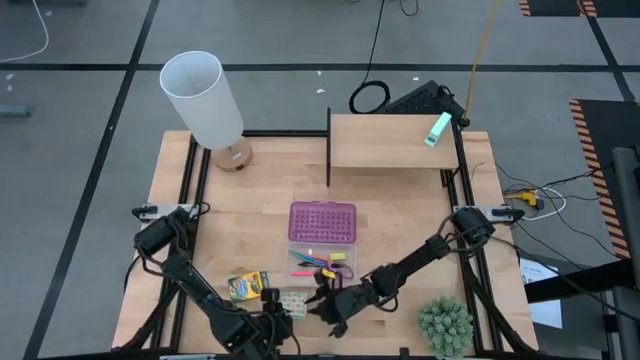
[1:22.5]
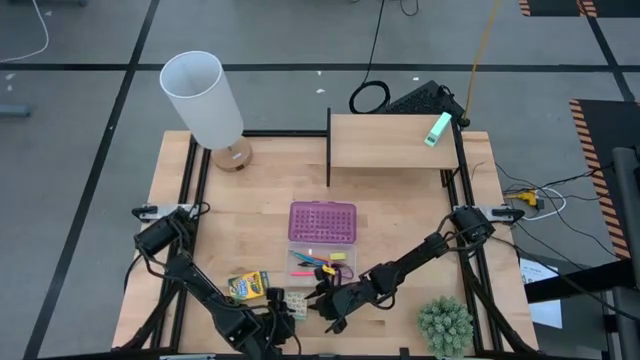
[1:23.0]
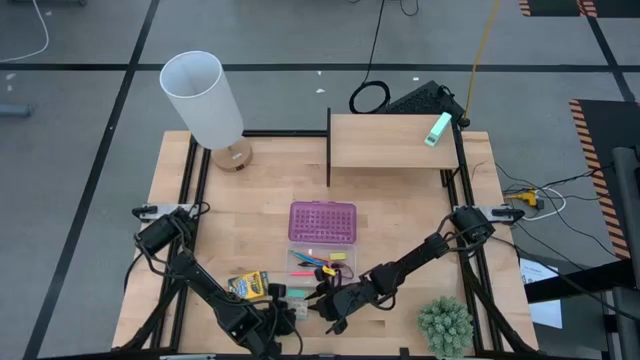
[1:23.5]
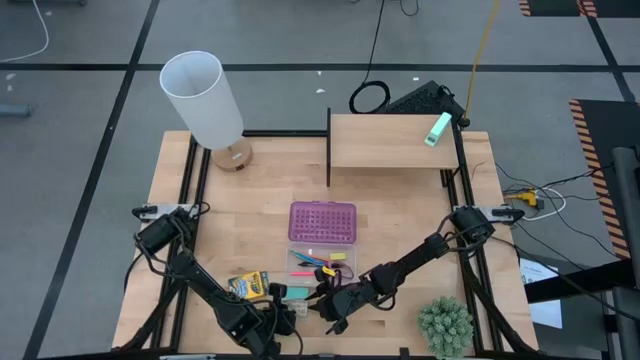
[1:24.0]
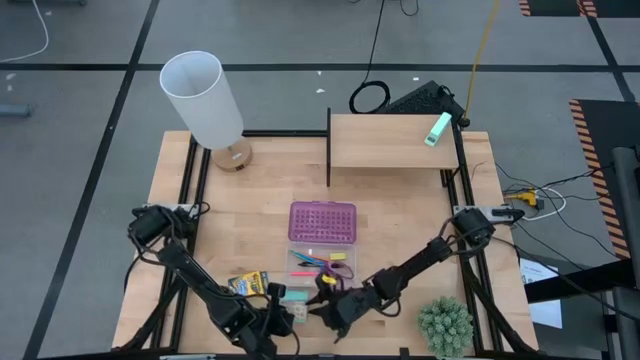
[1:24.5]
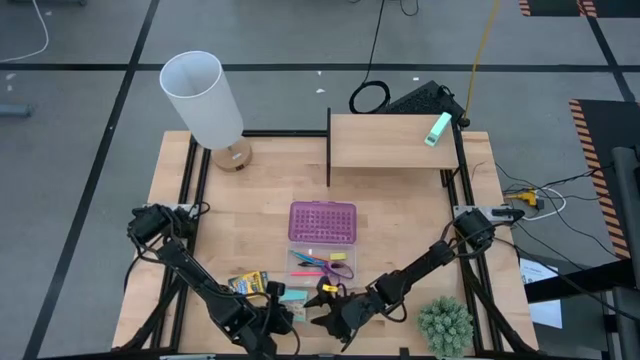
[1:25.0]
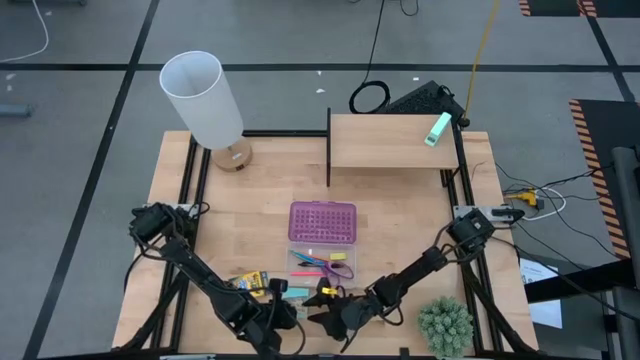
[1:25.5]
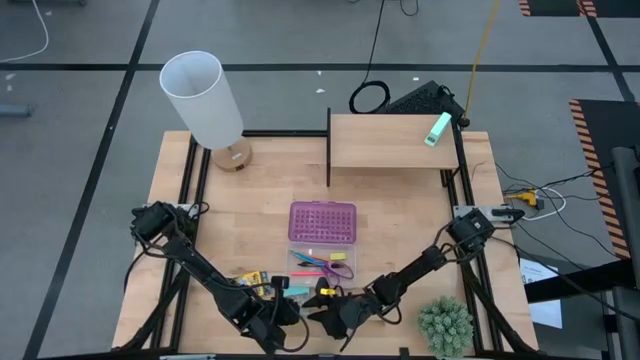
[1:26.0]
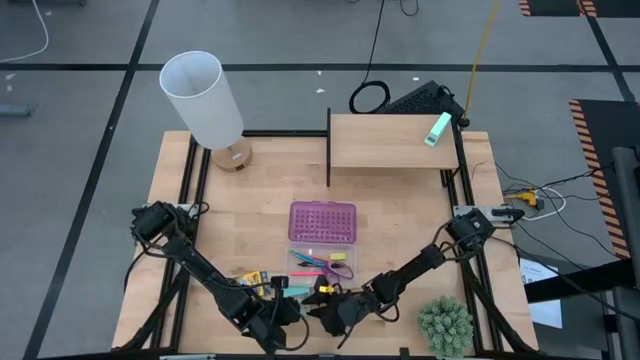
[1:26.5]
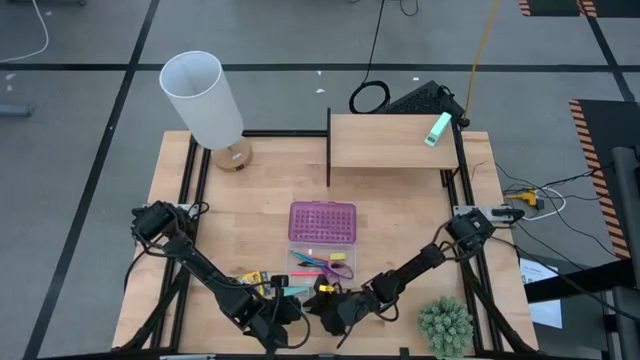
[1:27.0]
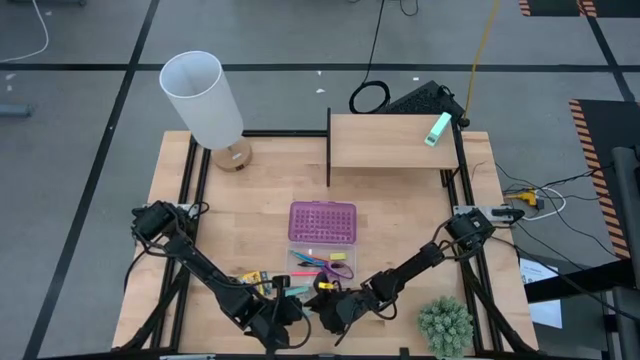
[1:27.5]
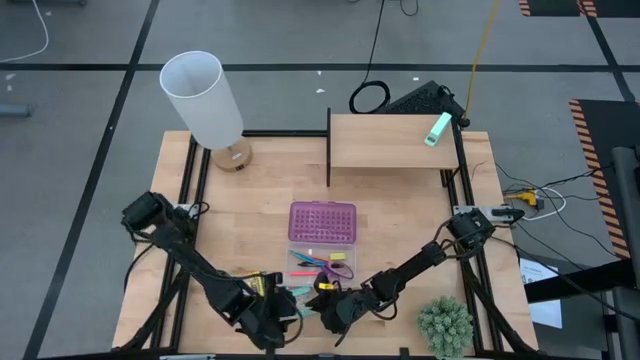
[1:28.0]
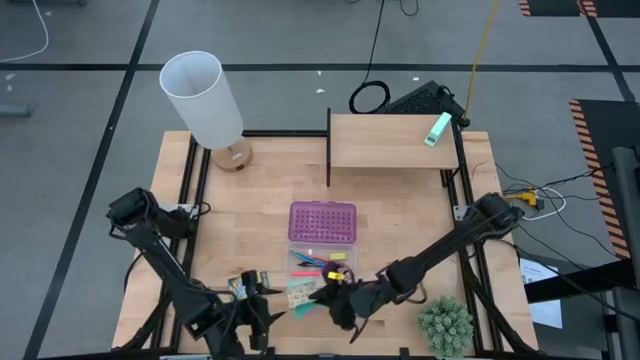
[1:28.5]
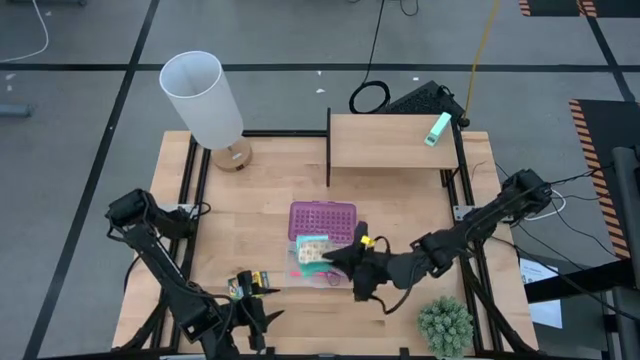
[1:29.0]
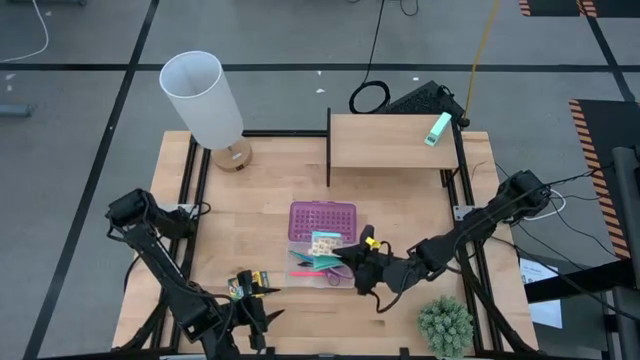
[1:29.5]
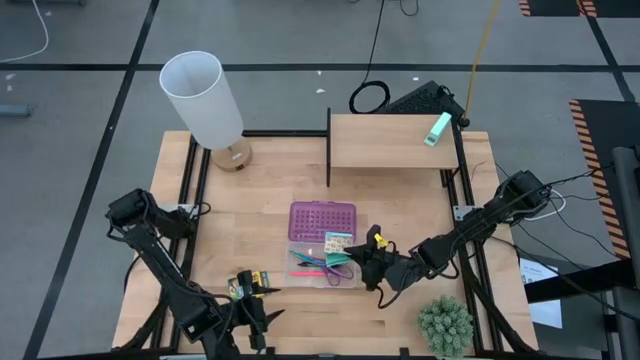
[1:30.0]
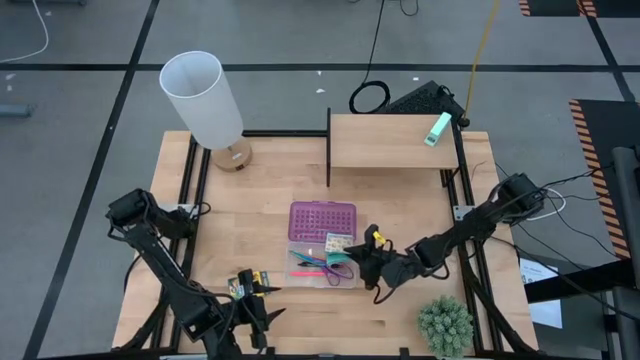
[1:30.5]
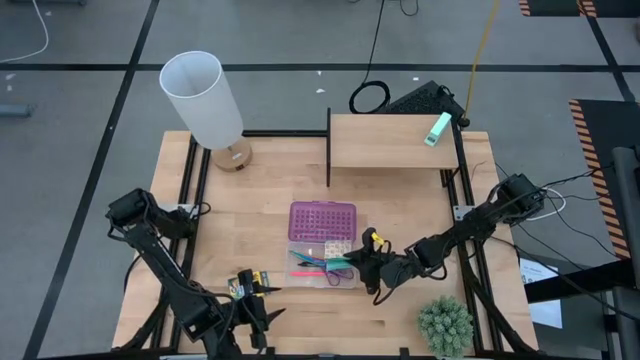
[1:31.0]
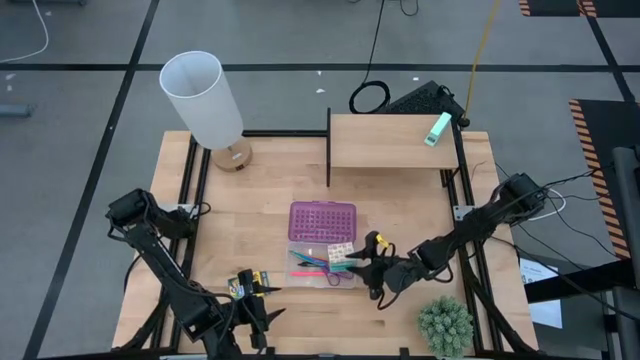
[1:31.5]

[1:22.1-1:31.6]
Task: Pack school essentials
Put the sticky notes into the violet plastic pencil case

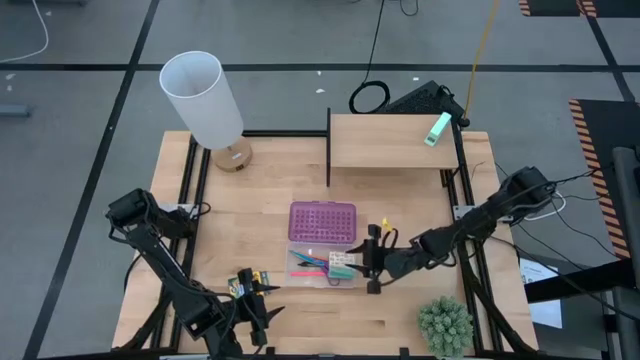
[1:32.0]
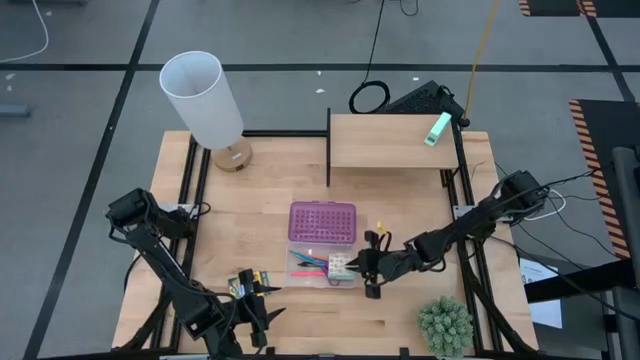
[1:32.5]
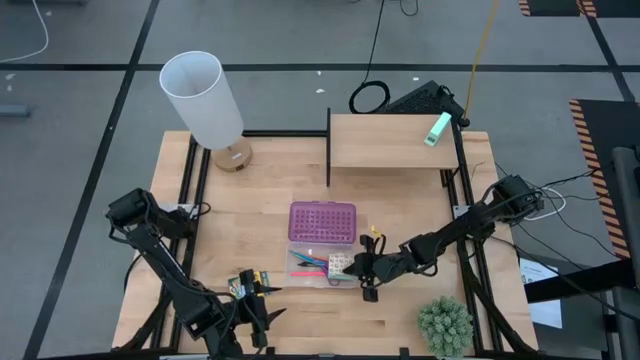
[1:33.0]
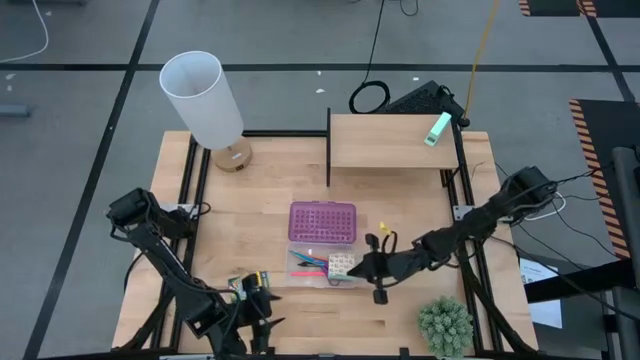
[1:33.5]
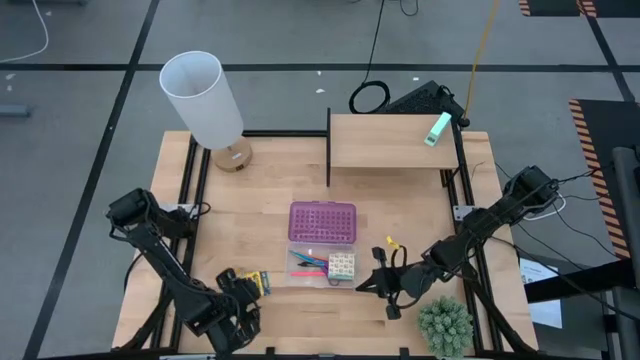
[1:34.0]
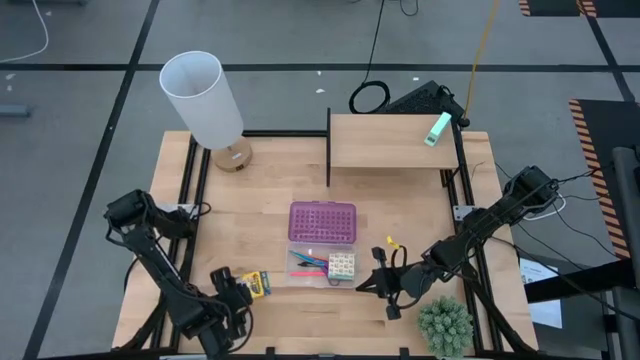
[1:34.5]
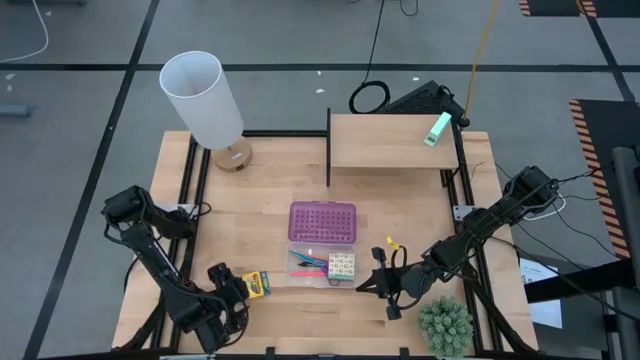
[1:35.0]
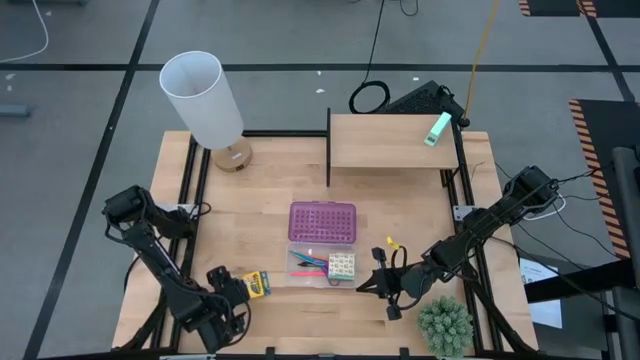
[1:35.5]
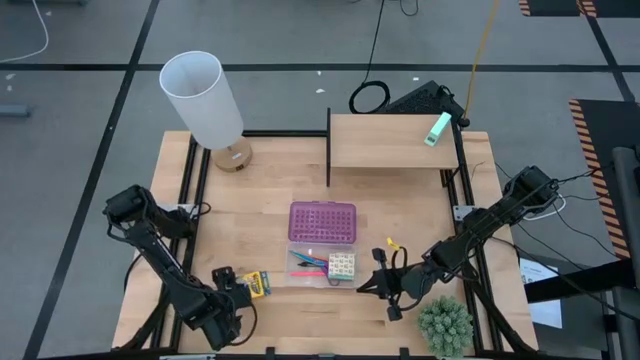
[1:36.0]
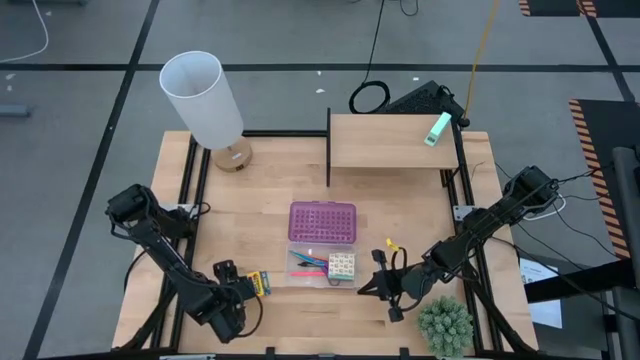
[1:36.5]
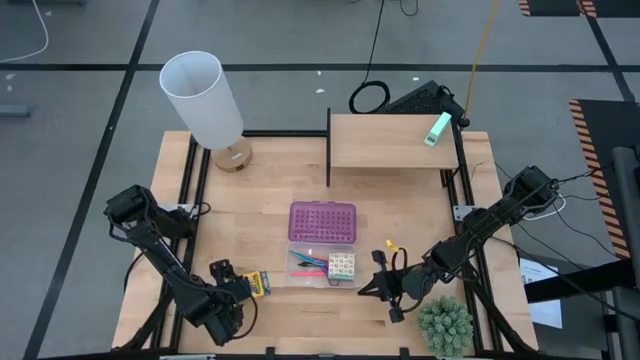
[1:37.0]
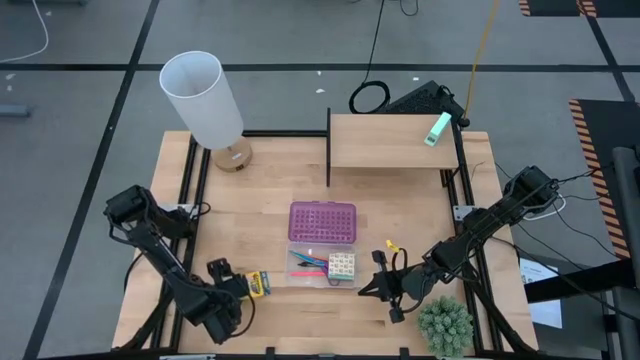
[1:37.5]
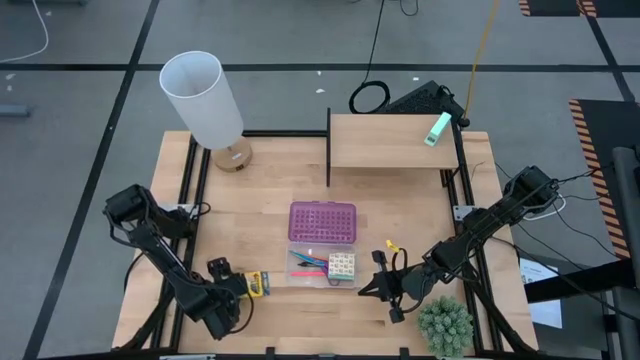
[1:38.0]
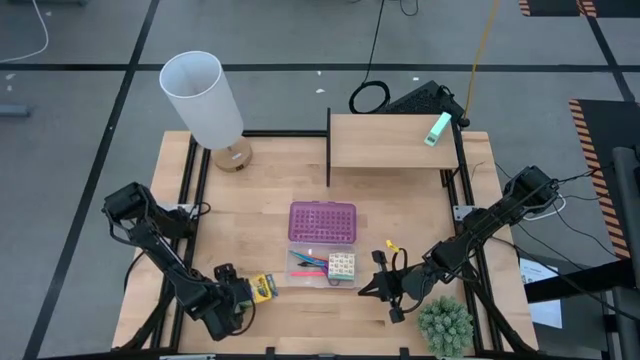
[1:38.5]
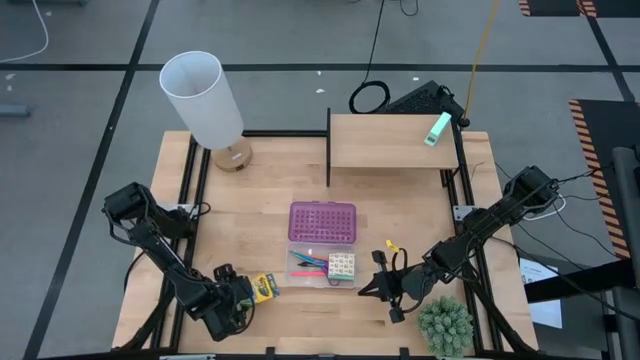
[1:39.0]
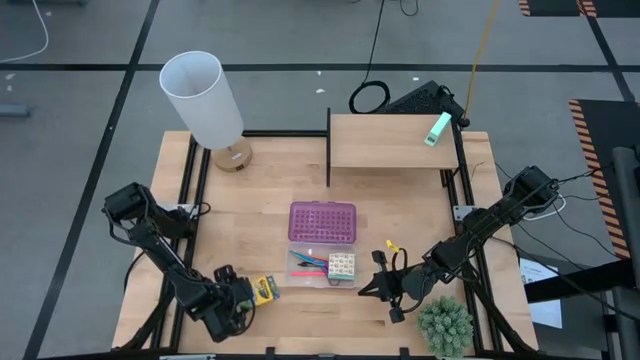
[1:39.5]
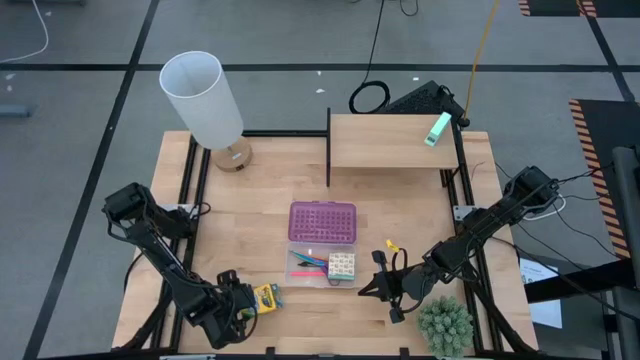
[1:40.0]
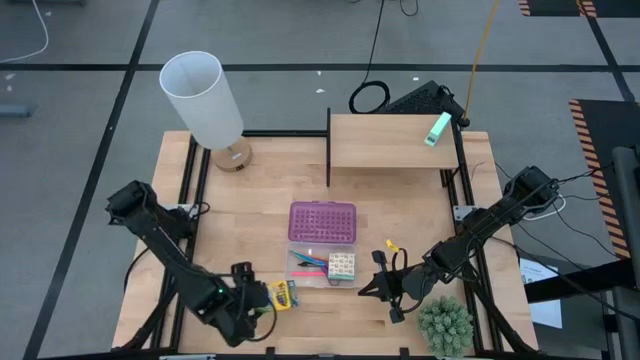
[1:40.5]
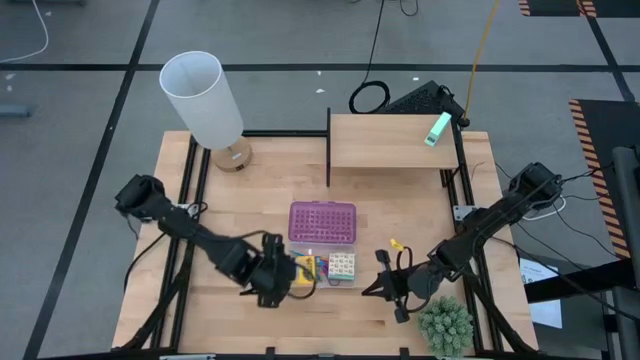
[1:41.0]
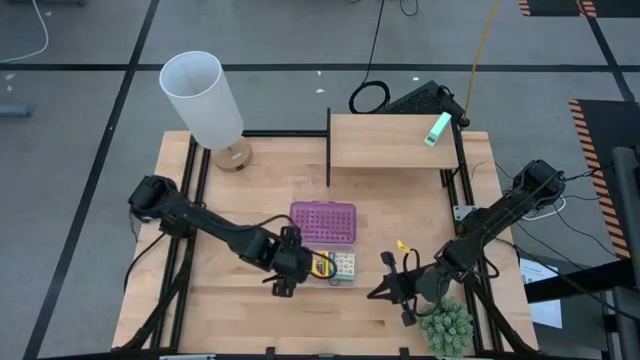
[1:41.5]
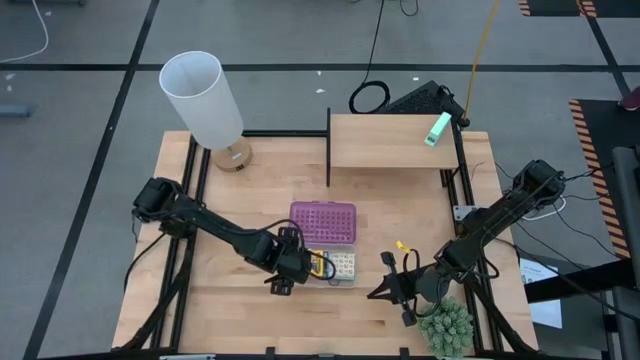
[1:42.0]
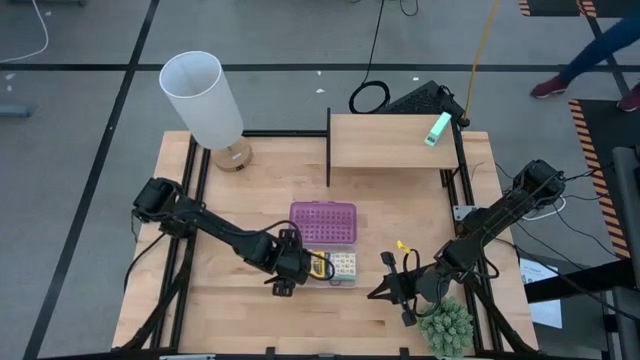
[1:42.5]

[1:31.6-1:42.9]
Put the crayon box into the violet pencil plastic case
